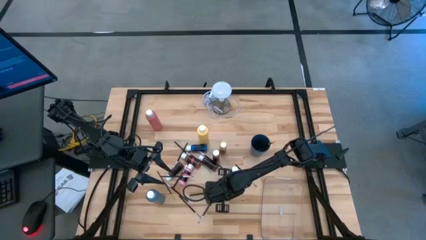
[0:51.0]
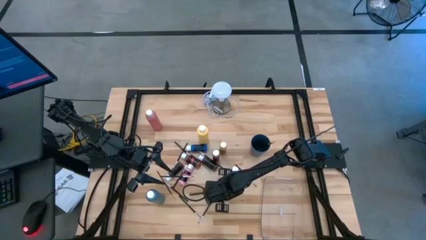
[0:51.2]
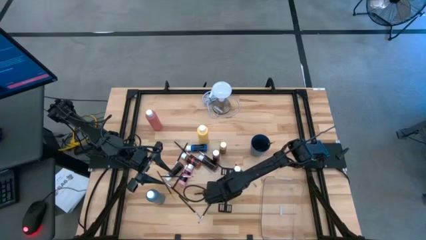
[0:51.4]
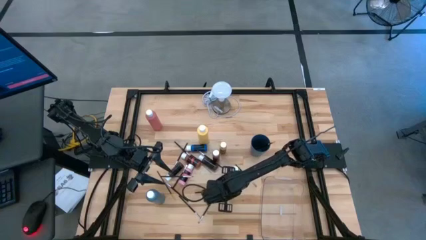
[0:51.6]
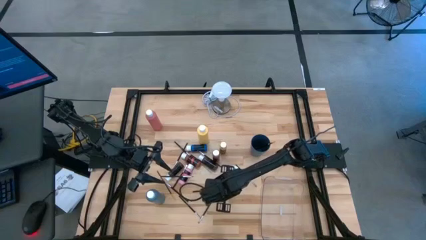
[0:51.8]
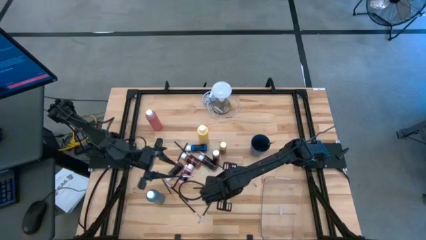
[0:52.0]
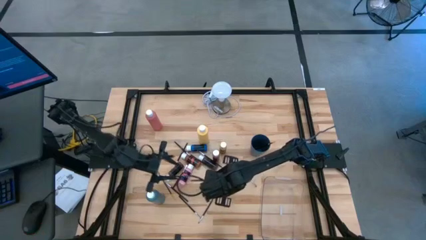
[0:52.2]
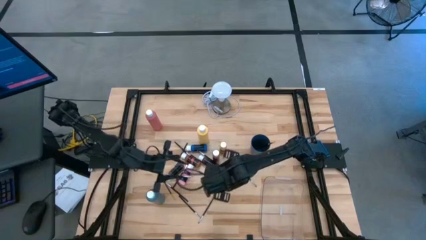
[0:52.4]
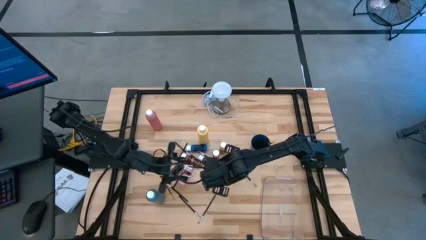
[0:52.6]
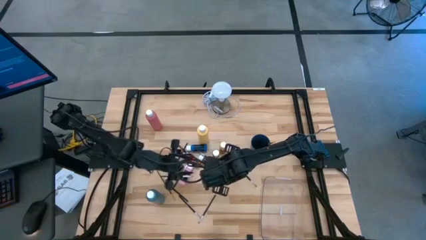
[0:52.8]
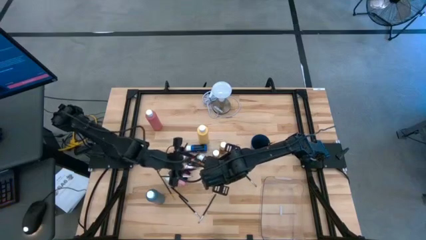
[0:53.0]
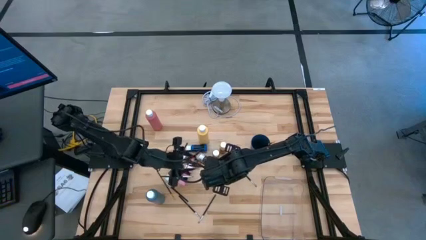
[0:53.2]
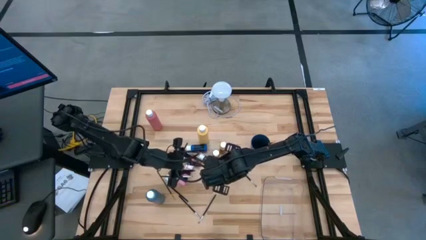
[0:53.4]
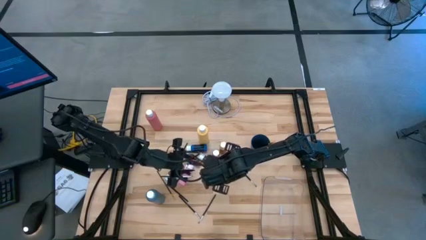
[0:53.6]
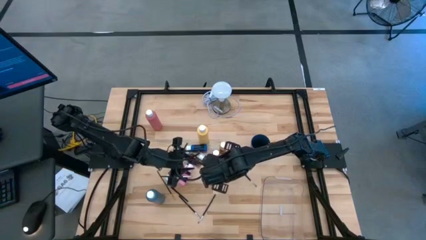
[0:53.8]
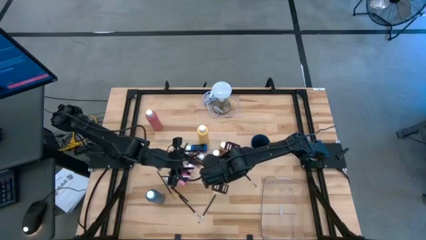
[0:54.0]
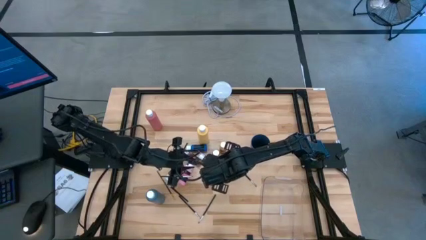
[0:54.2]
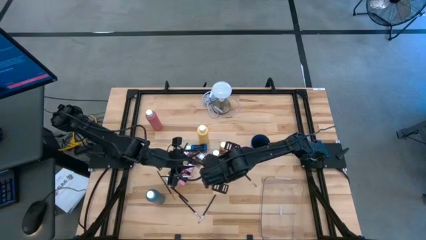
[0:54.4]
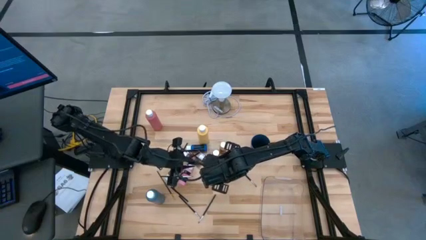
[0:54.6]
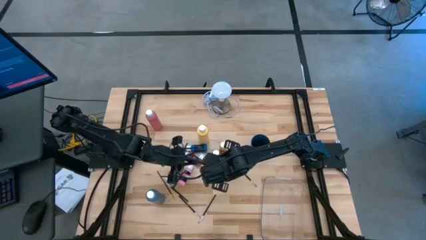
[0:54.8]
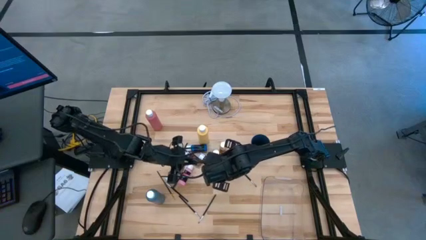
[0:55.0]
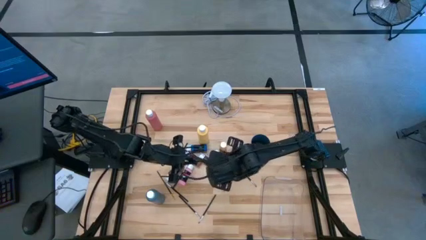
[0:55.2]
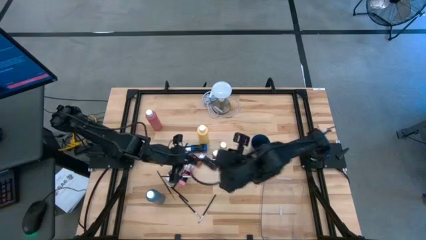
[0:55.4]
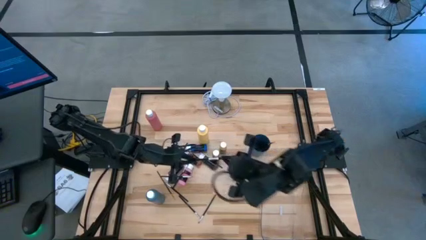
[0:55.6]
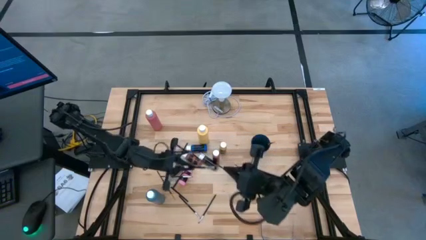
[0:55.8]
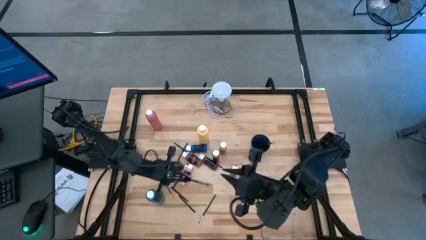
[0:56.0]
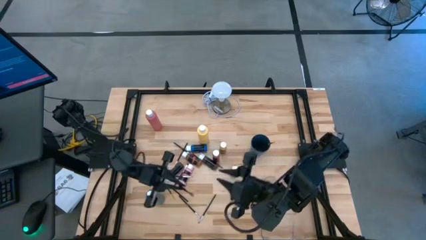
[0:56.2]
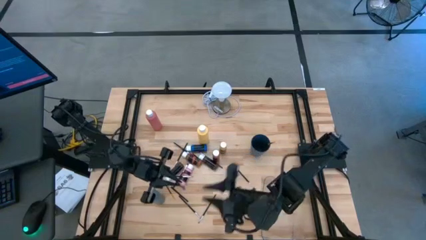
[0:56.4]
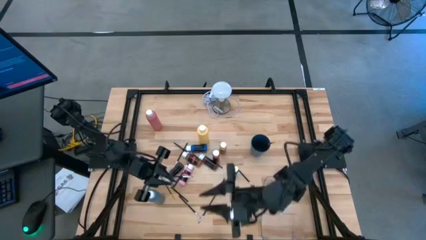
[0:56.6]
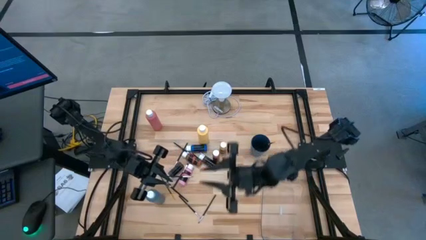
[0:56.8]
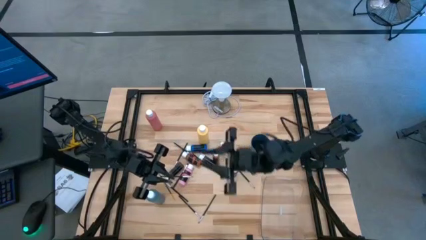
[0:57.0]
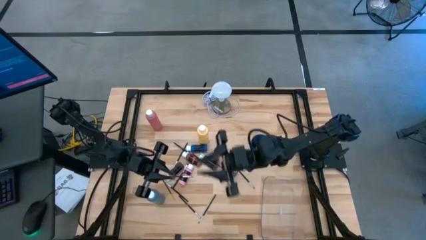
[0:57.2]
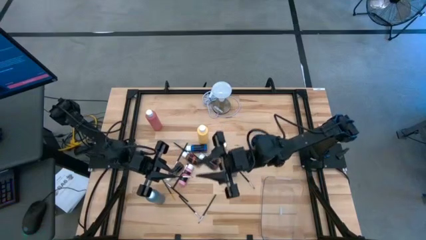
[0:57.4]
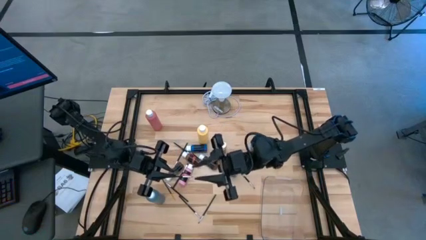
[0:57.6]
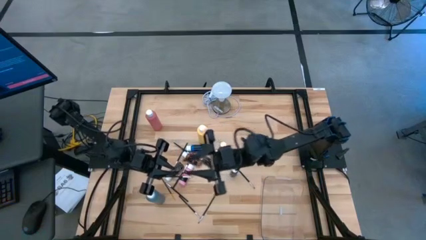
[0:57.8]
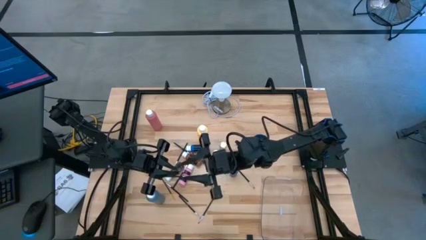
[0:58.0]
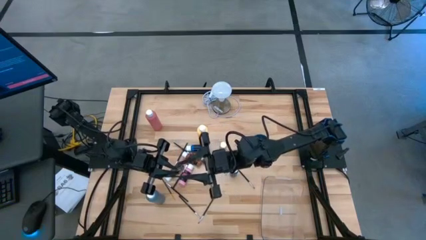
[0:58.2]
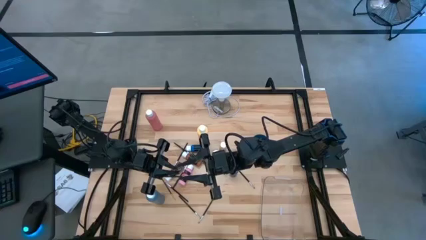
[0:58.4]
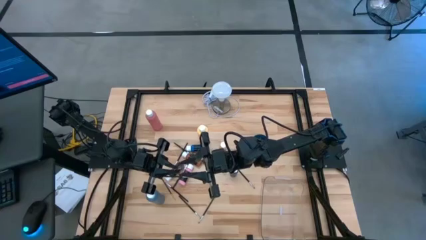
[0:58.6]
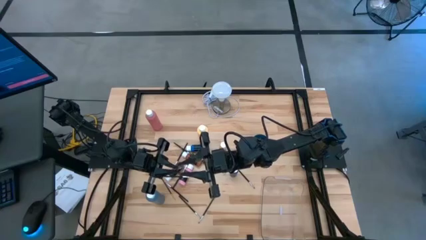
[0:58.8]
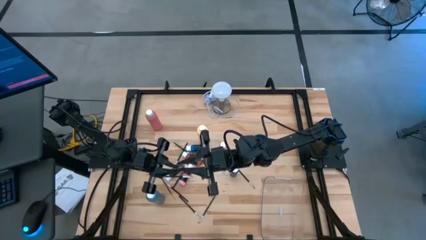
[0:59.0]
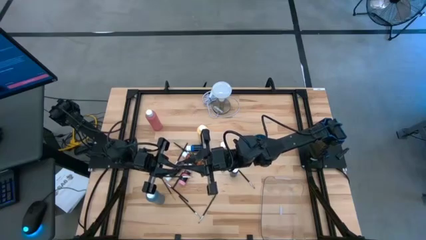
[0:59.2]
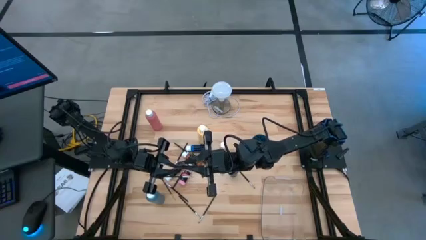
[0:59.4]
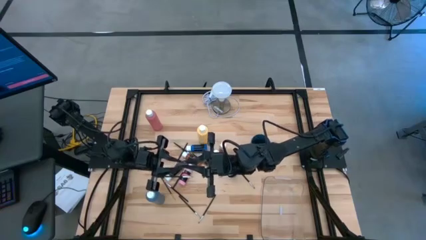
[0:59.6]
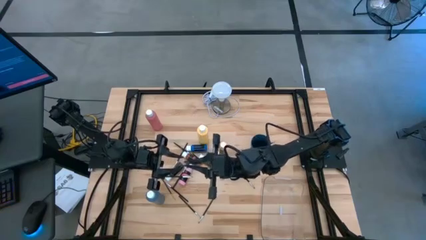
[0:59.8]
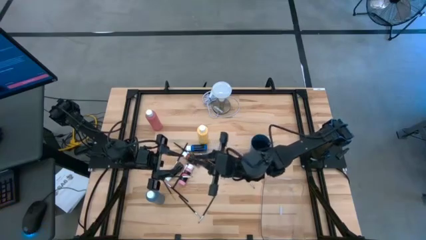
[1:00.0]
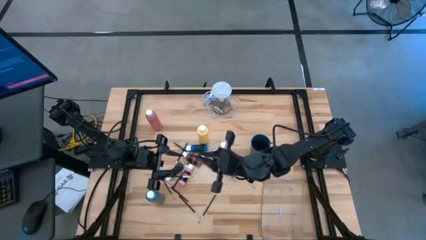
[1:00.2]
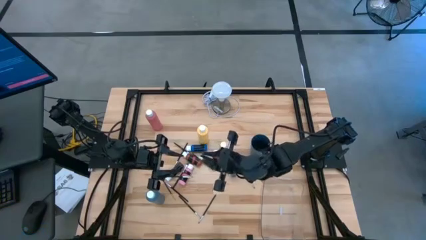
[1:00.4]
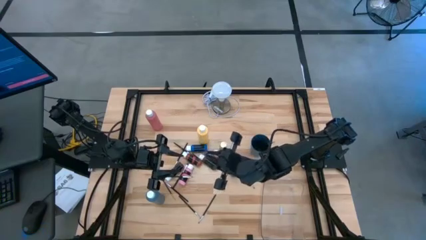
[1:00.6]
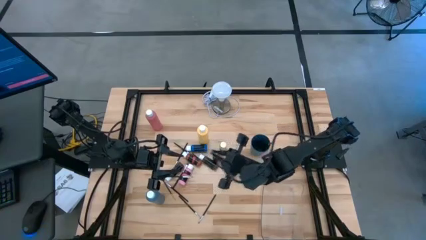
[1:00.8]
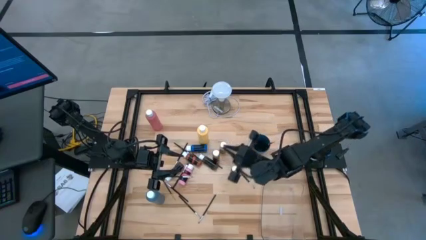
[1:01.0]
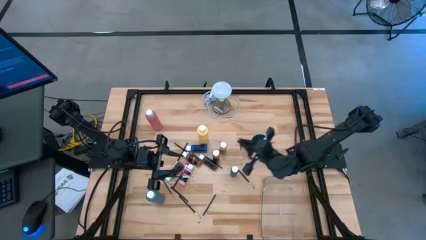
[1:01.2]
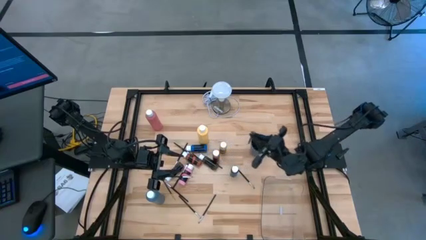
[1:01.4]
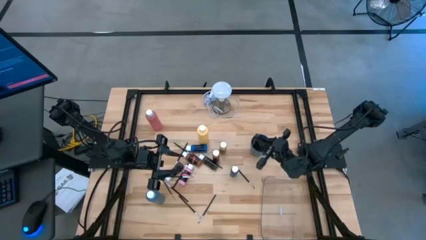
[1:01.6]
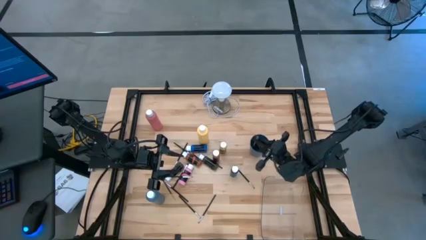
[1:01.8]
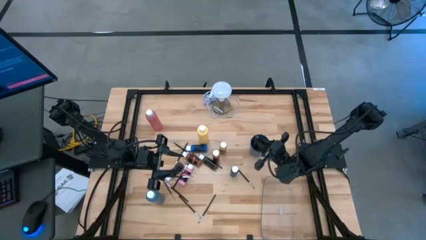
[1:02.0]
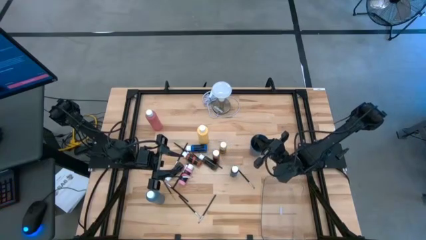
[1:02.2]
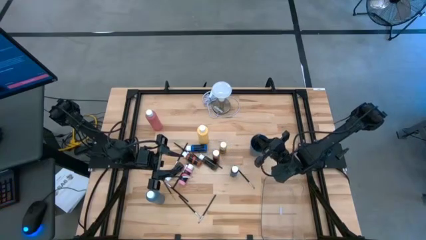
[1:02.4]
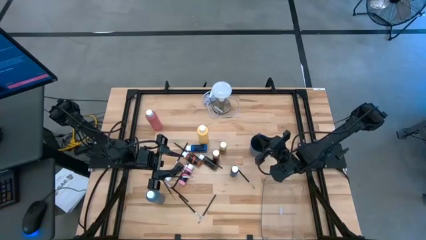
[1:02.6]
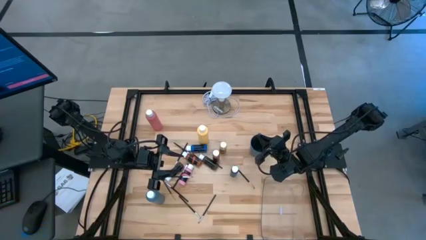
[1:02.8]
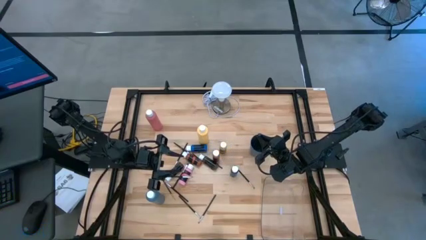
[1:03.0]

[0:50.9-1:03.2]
Task: Pick & Place Paint Supplies
Put the black silver paintbrush into the blue cup
